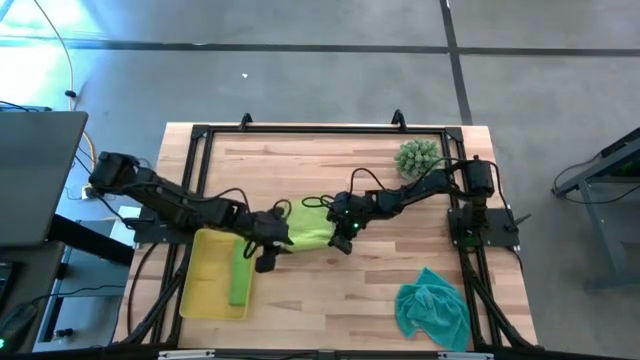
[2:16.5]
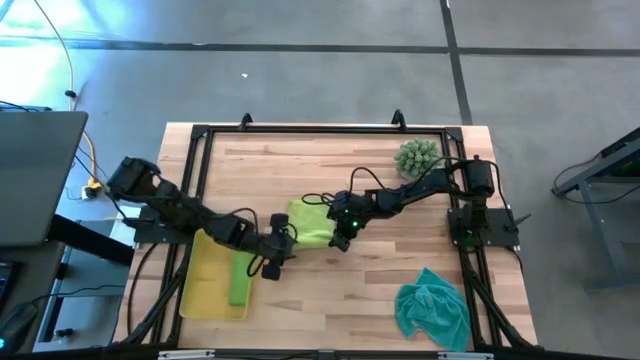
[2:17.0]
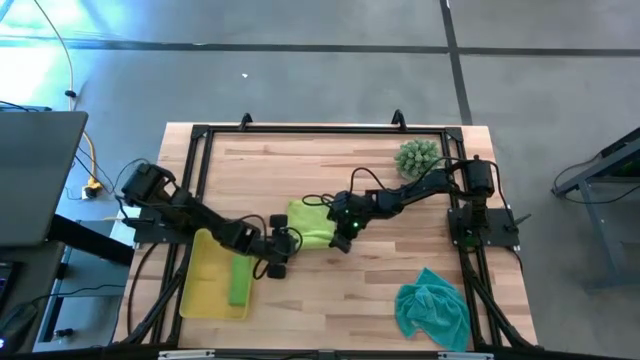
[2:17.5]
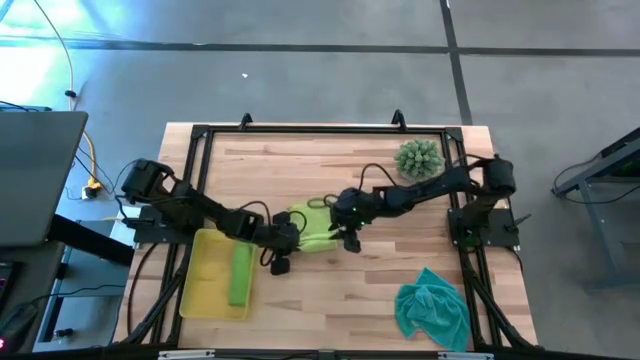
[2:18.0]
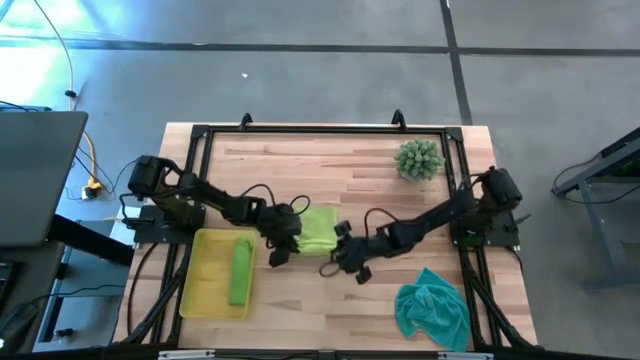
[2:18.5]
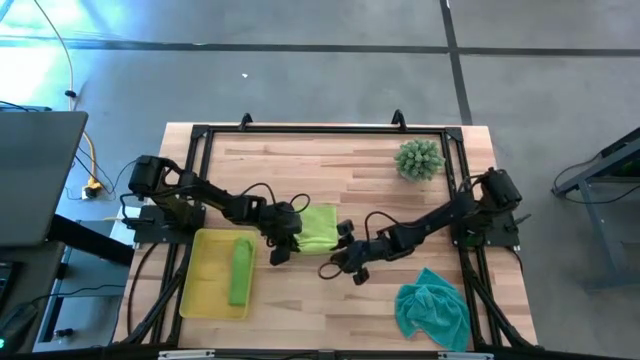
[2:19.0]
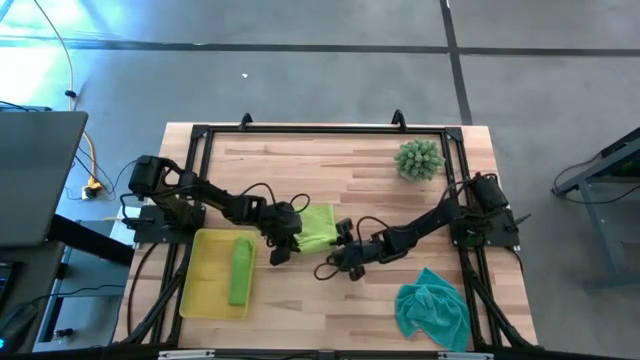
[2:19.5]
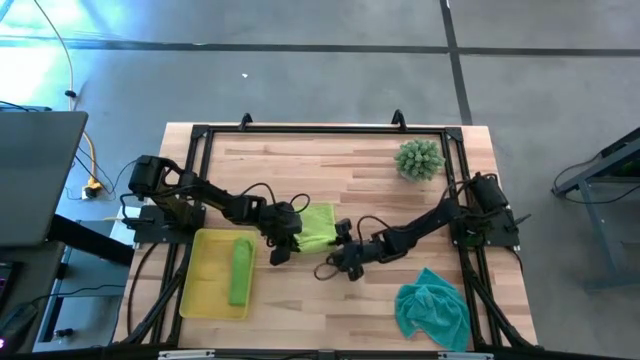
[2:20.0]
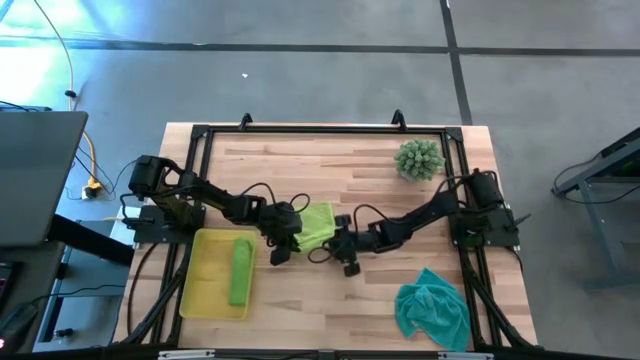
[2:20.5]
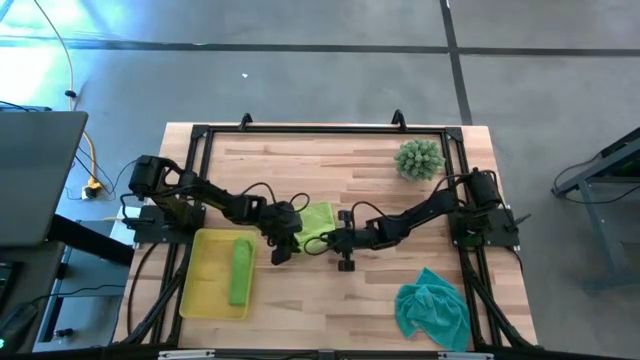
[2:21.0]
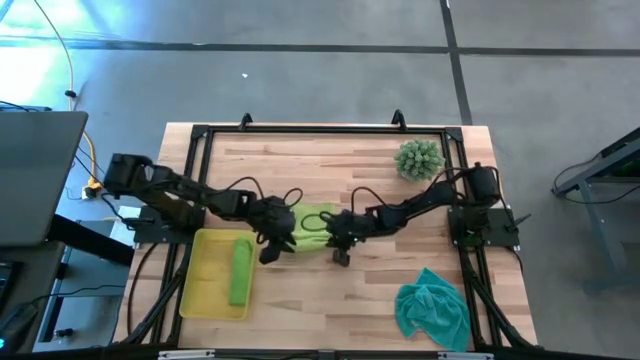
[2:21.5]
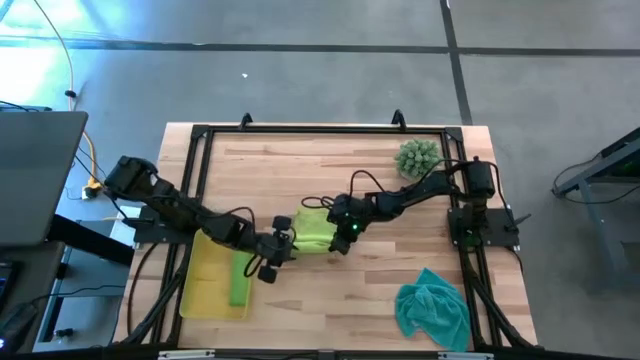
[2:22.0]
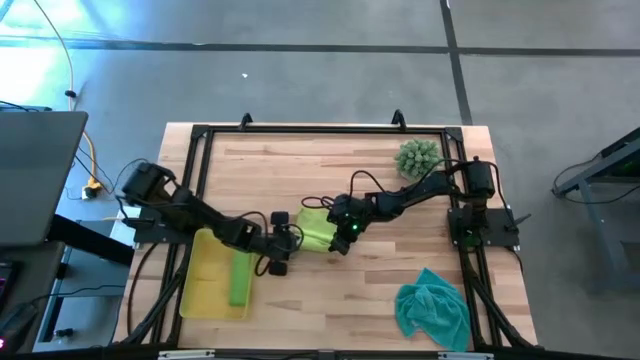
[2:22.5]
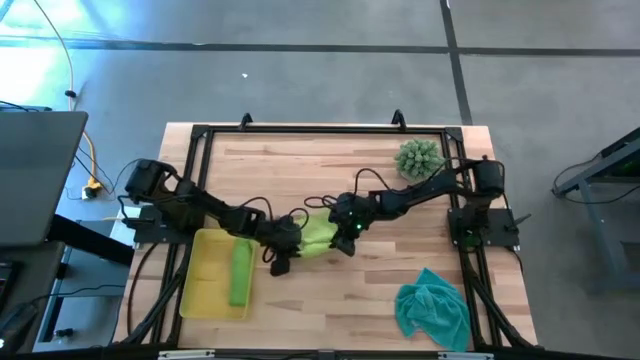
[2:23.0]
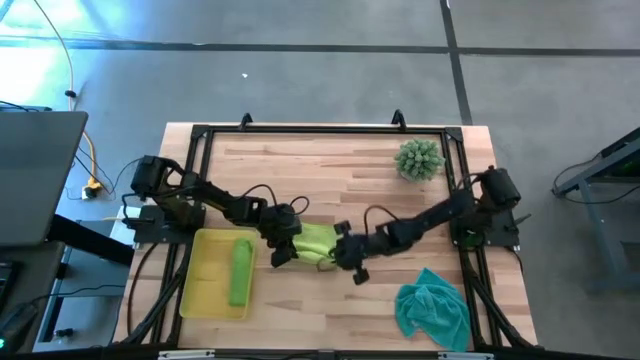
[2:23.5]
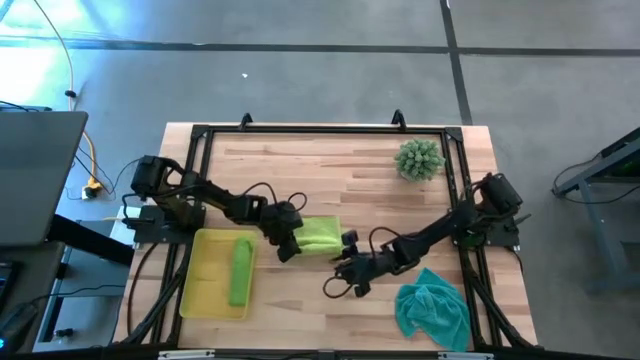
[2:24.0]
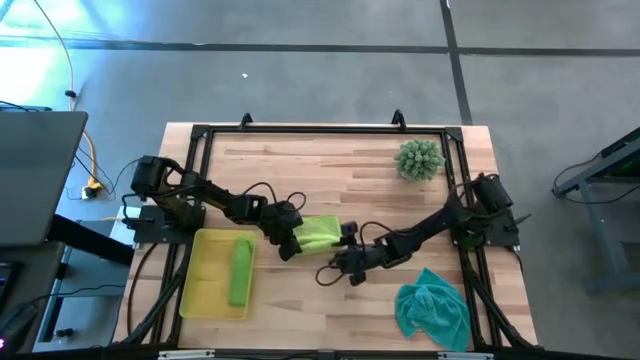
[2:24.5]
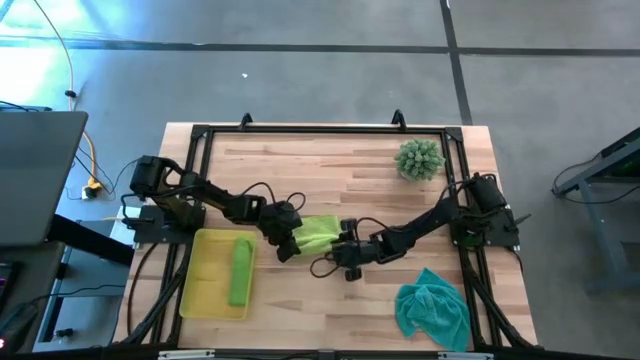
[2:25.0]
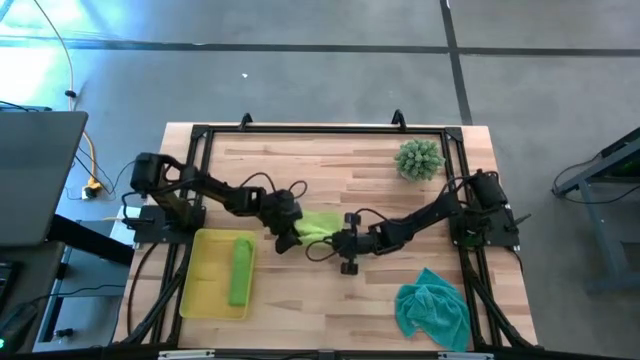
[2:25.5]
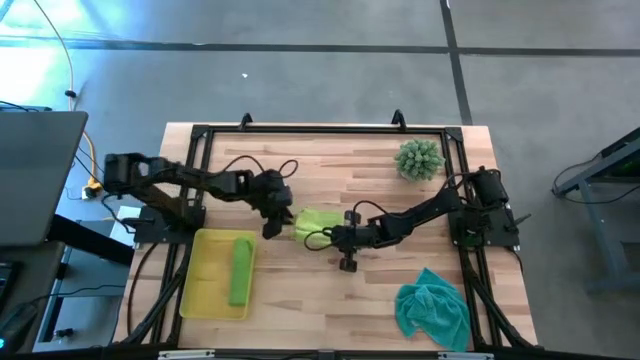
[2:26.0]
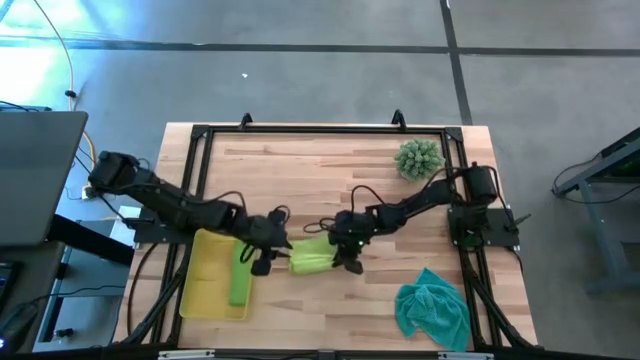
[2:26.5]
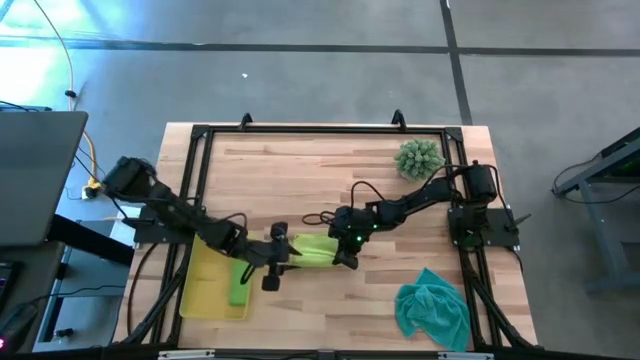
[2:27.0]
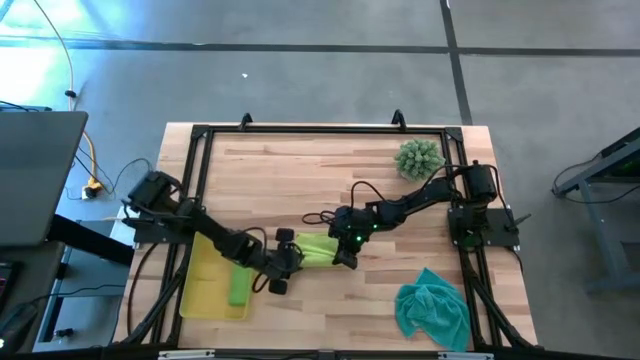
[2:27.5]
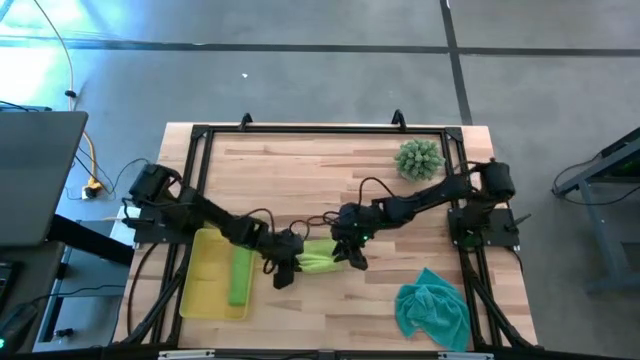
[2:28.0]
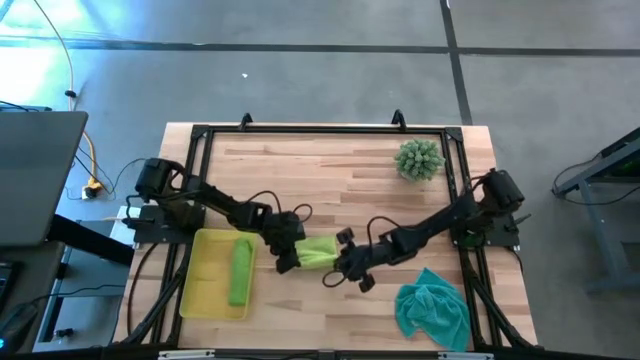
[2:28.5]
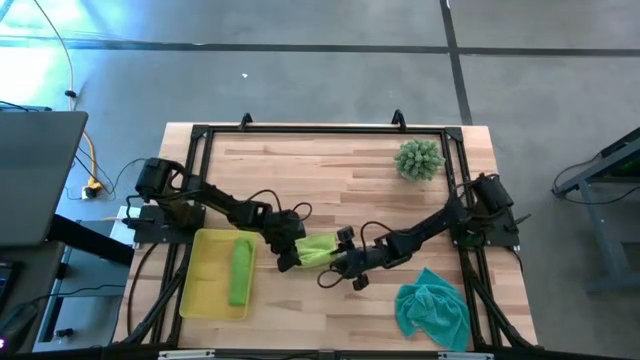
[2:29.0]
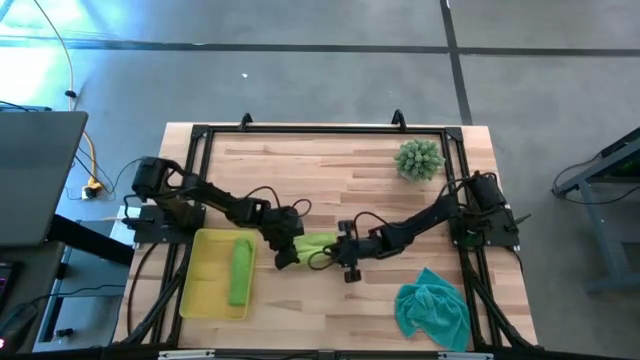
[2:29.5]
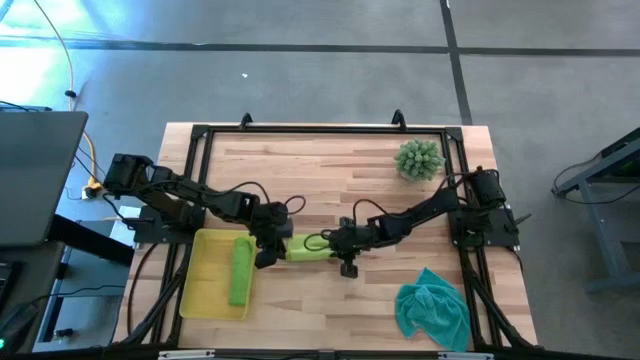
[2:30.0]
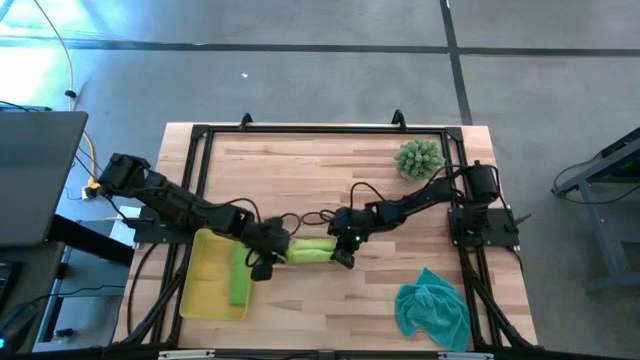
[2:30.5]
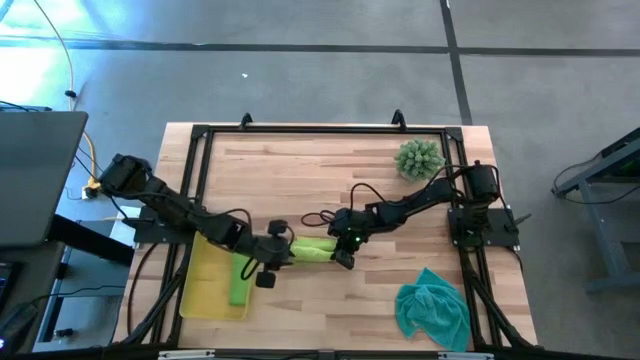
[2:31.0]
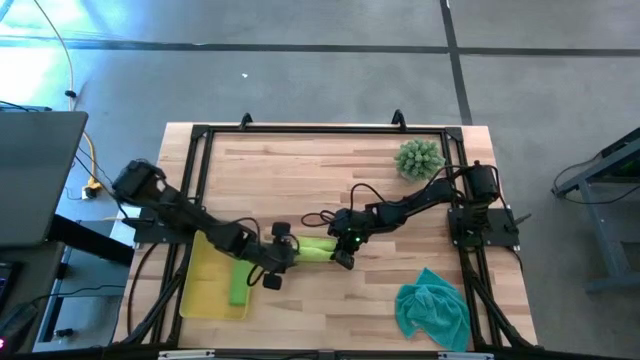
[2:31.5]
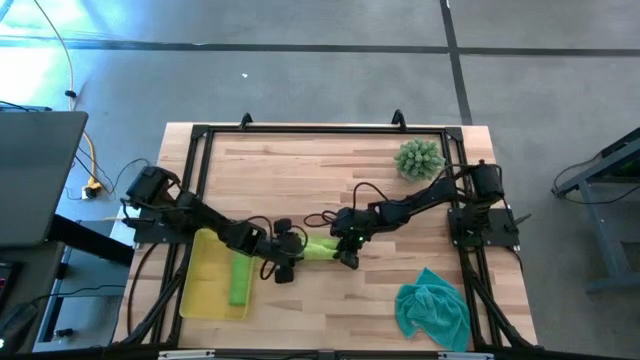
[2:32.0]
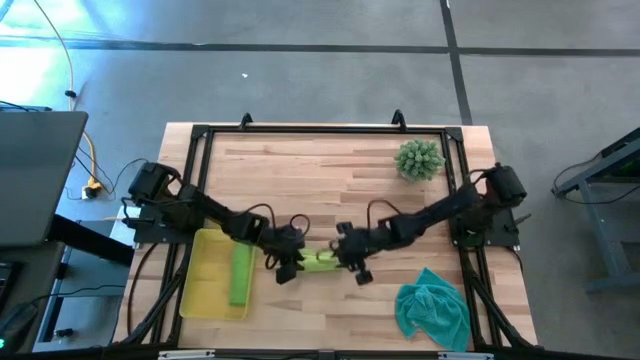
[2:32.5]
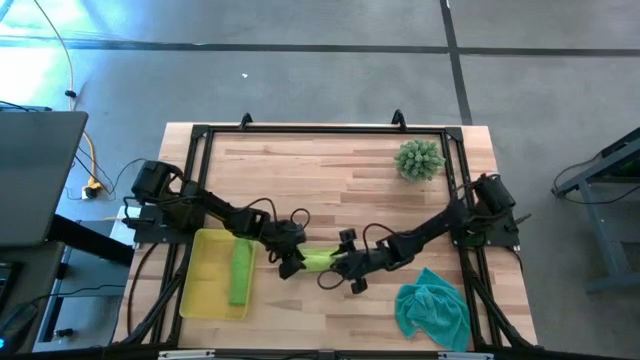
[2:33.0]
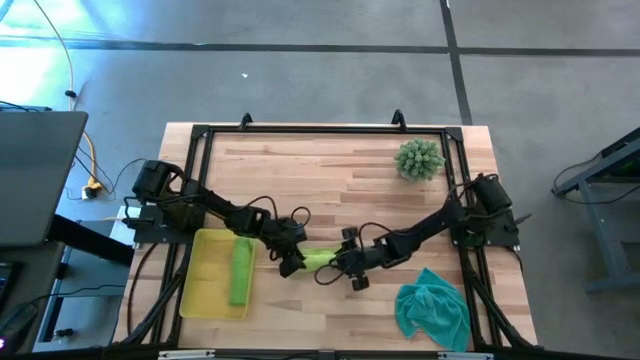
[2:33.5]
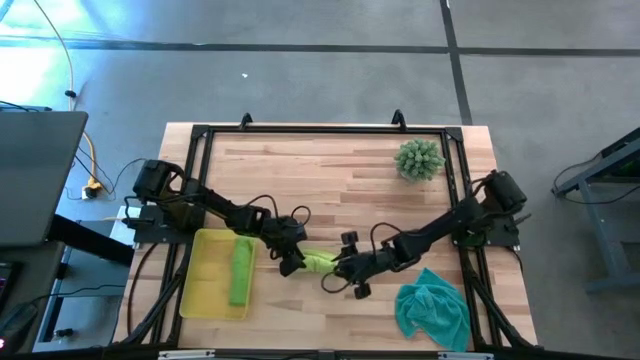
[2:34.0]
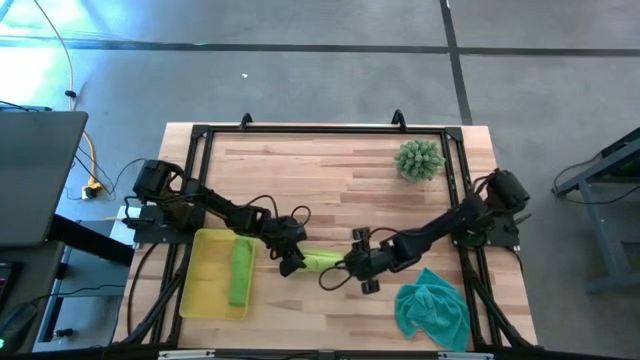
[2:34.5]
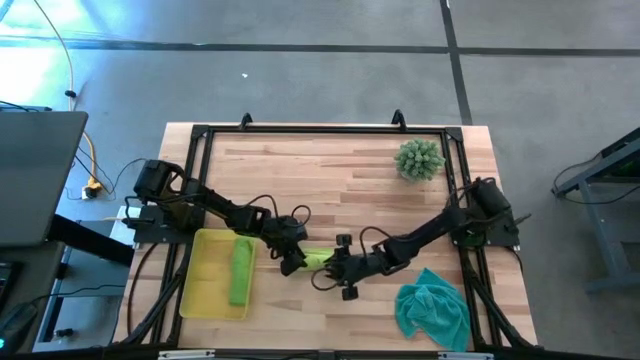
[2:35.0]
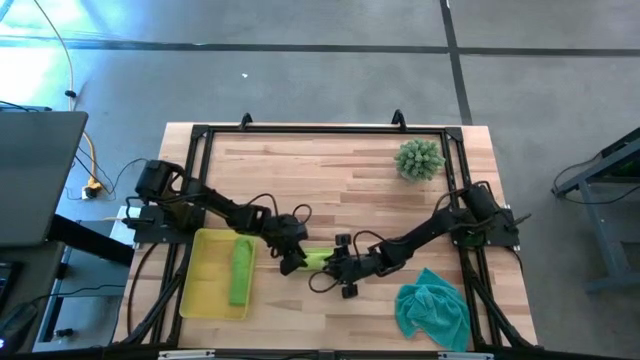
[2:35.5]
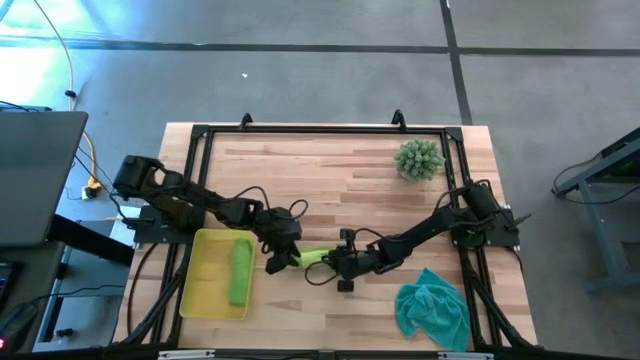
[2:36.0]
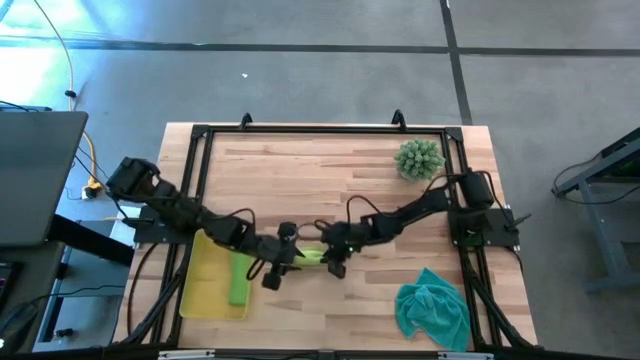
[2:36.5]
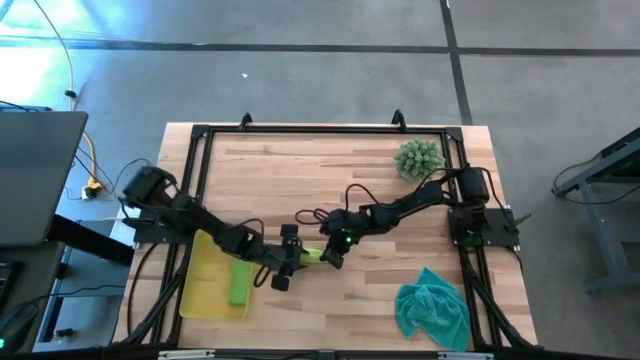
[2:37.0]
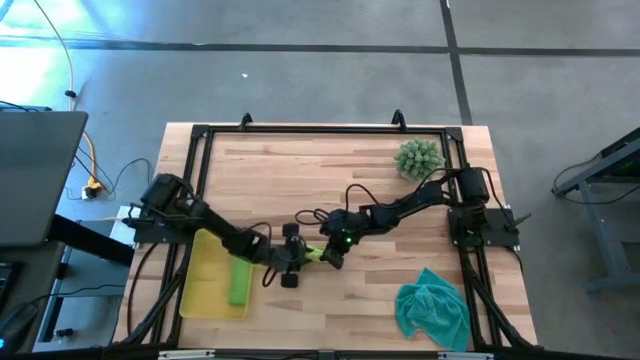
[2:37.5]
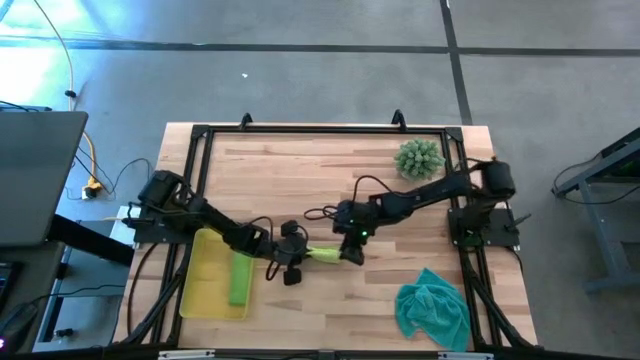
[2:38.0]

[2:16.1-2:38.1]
Task: Roll microfiber towels into tight, uniform cylinder then place into a basket
Roll the light green microfiber towel
